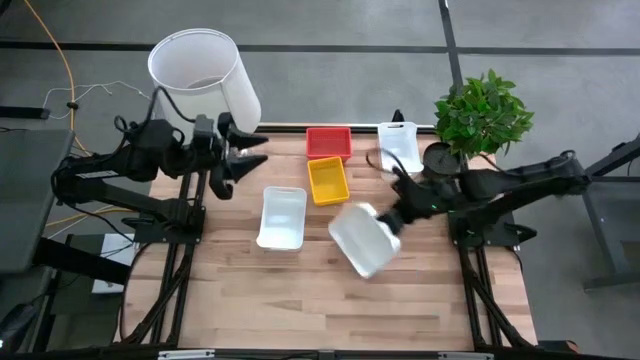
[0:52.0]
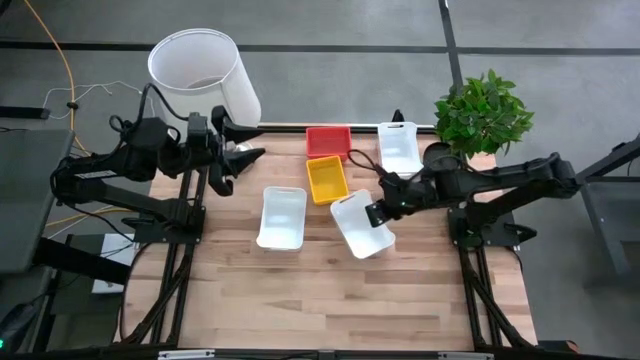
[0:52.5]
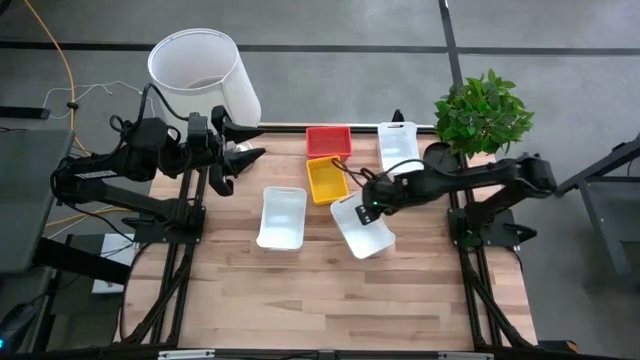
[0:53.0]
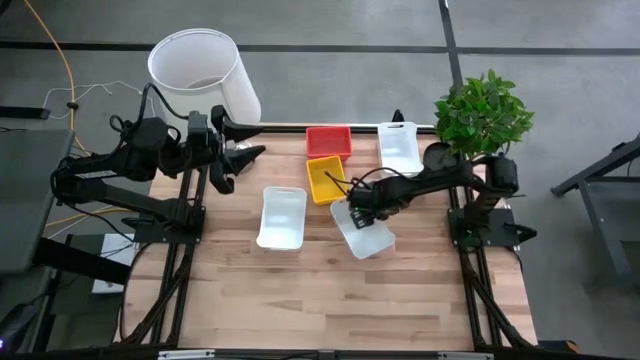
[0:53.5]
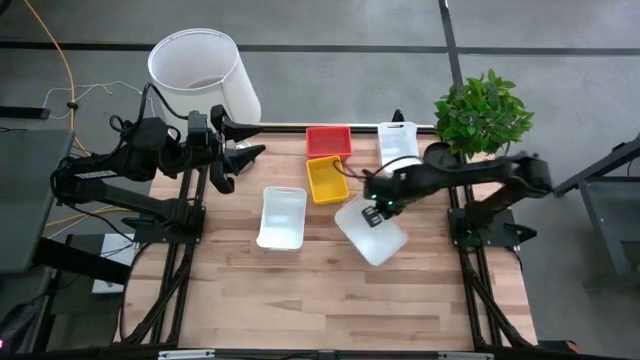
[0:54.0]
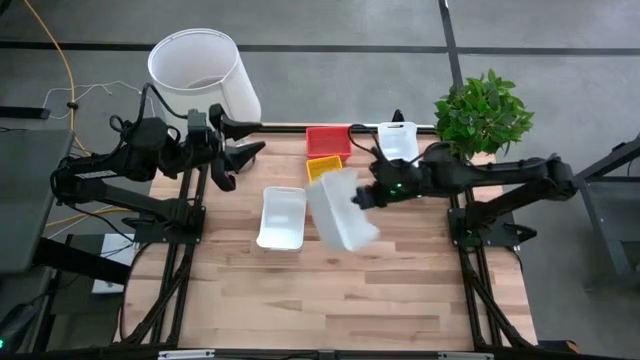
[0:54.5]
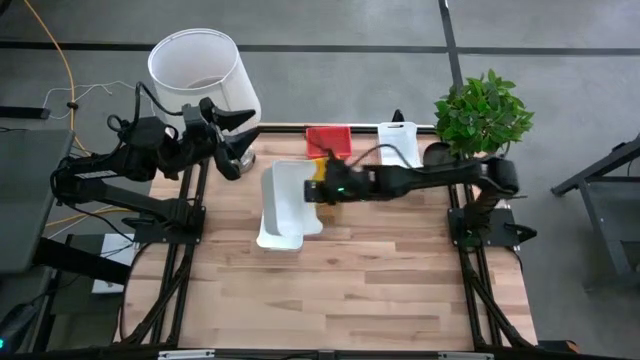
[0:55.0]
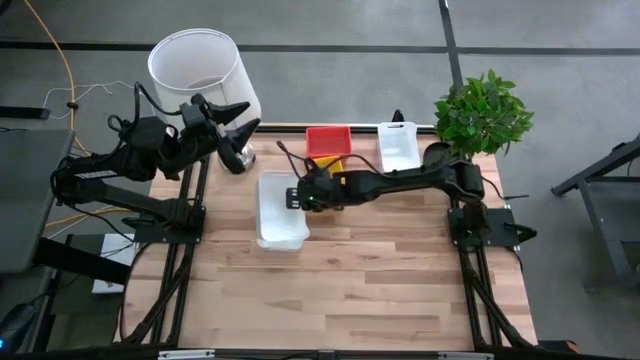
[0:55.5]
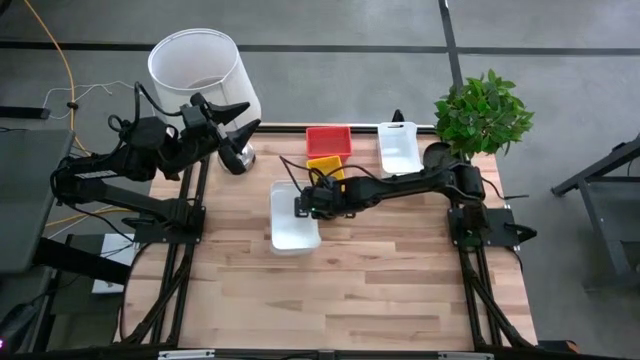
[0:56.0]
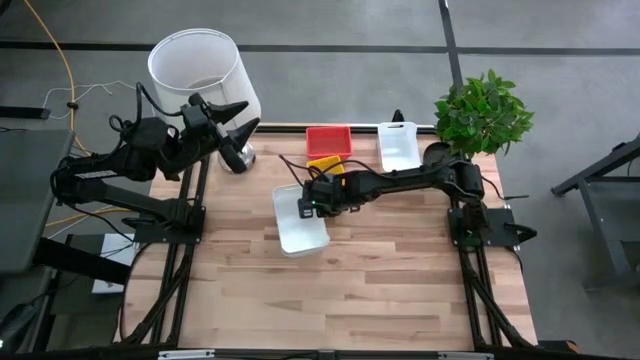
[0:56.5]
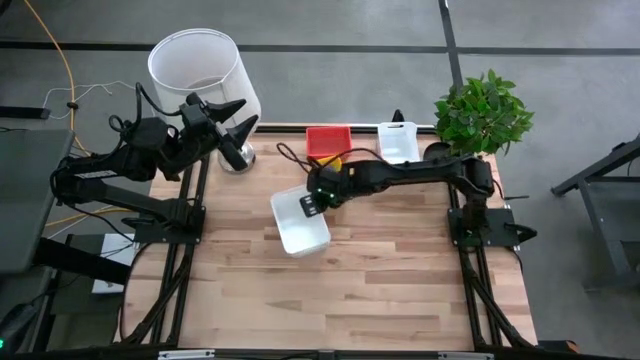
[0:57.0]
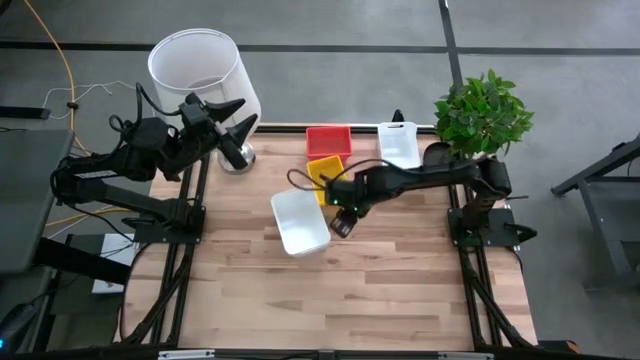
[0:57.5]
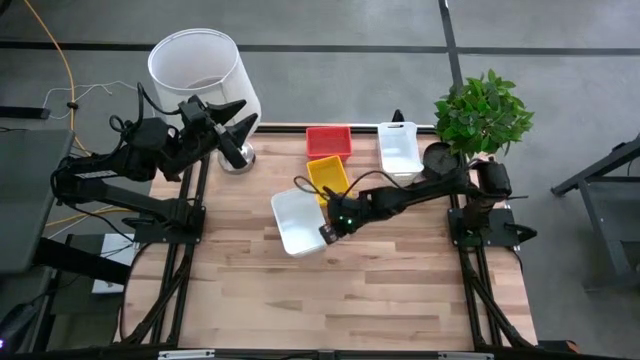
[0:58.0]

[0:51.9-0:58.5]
Stack the bottom right white bin on the middle white bin

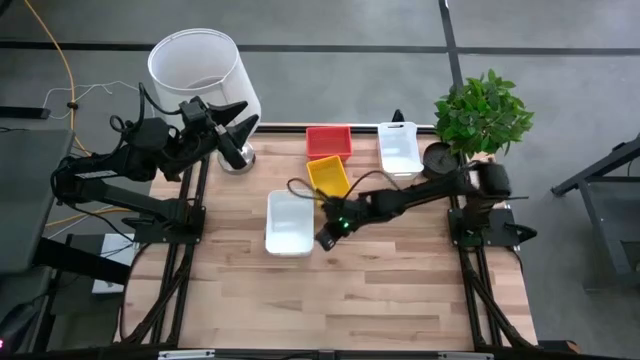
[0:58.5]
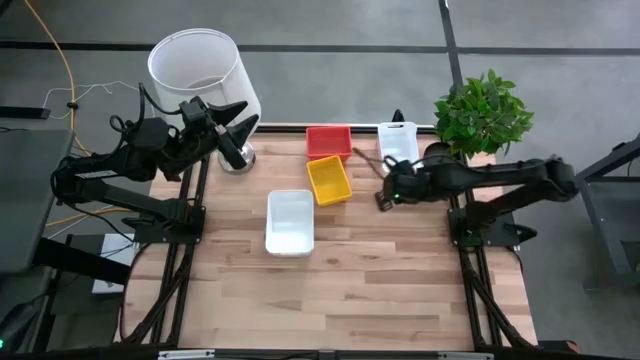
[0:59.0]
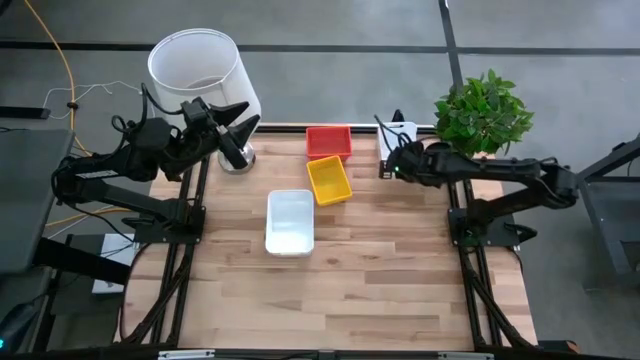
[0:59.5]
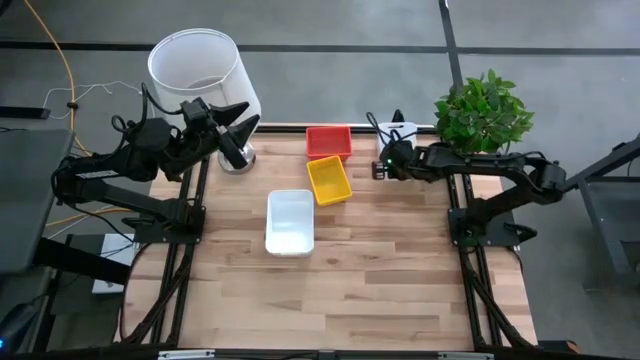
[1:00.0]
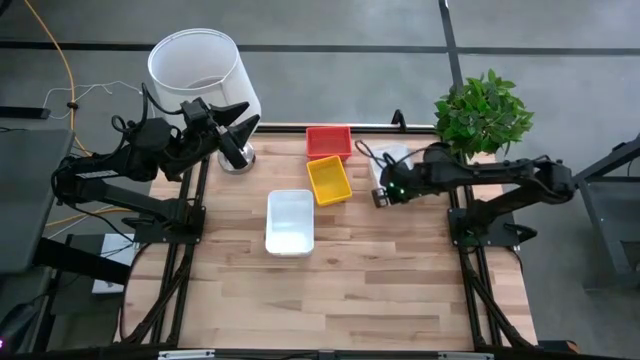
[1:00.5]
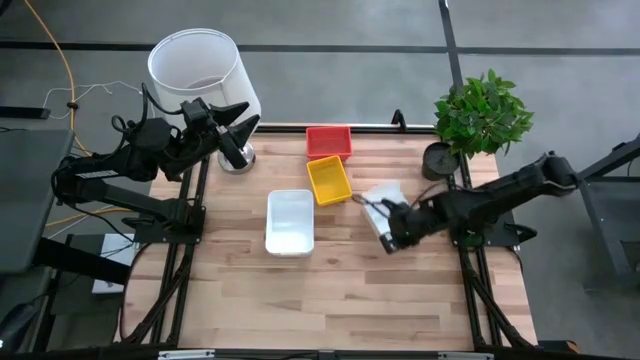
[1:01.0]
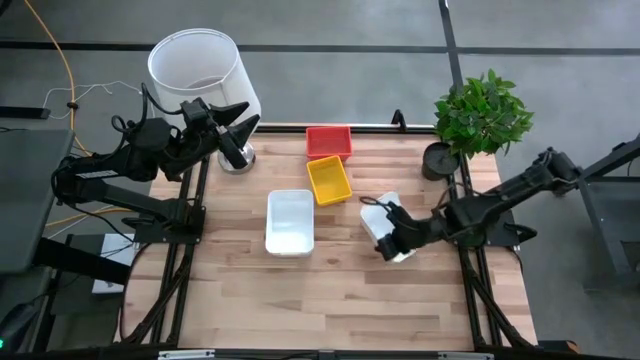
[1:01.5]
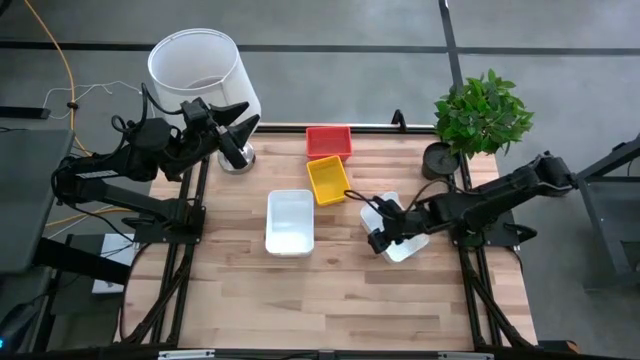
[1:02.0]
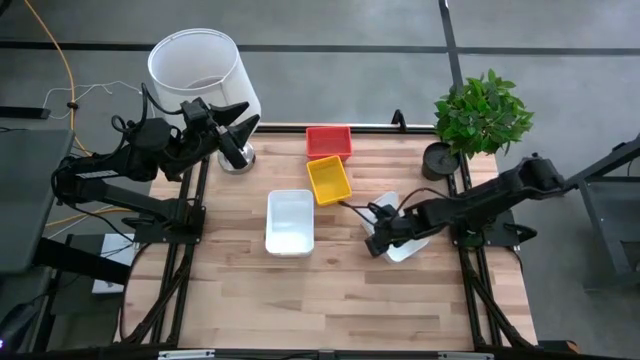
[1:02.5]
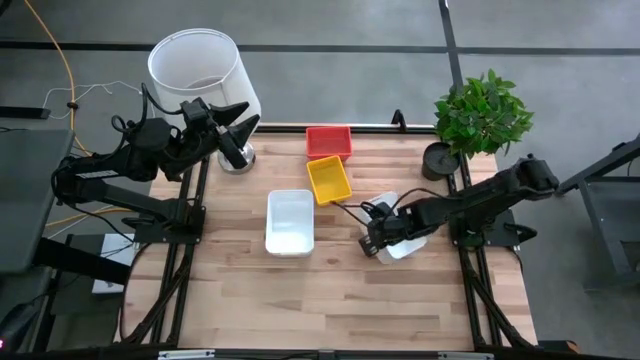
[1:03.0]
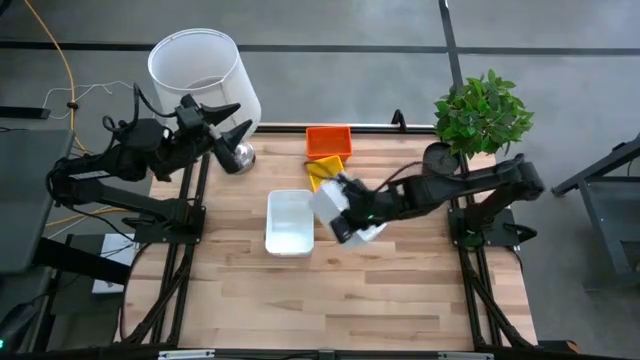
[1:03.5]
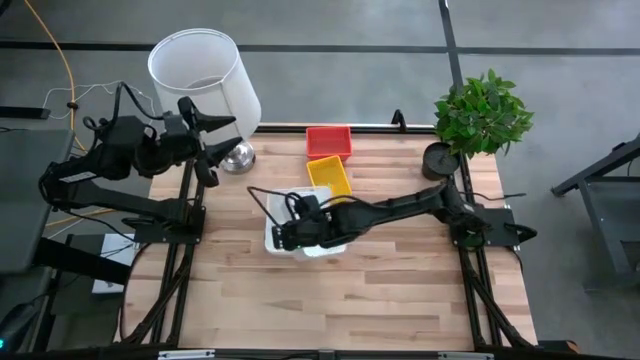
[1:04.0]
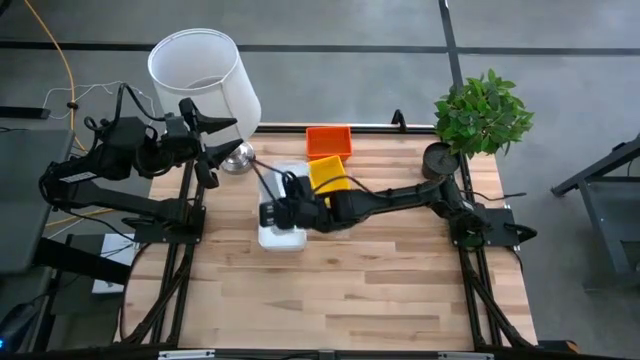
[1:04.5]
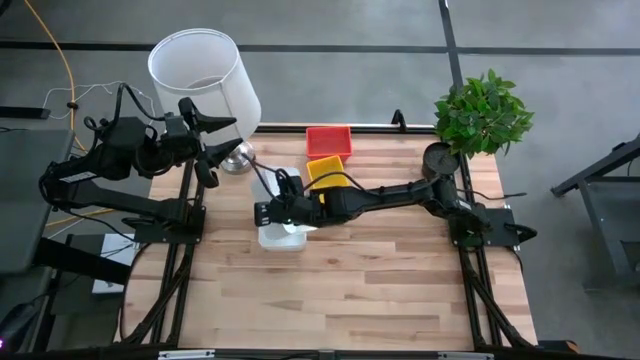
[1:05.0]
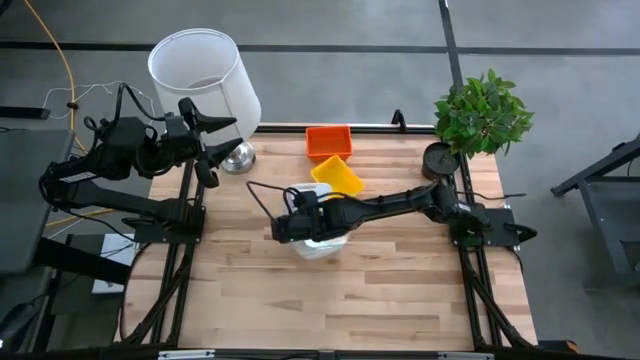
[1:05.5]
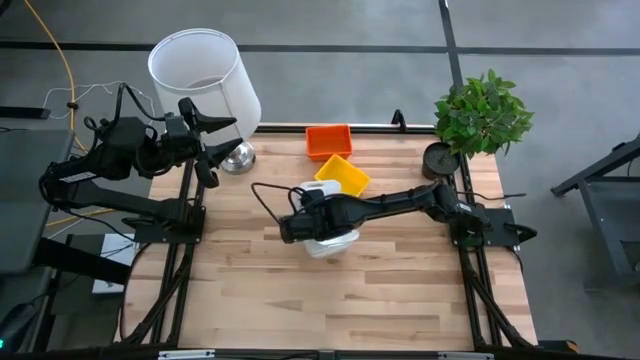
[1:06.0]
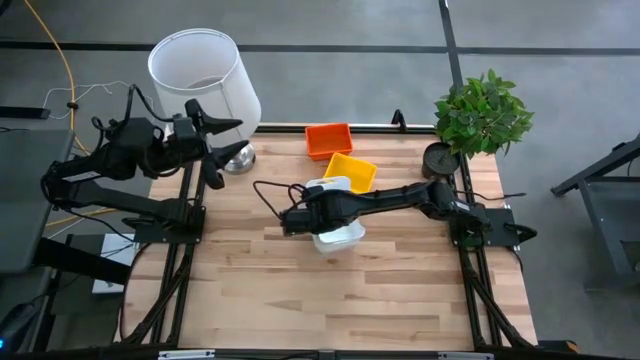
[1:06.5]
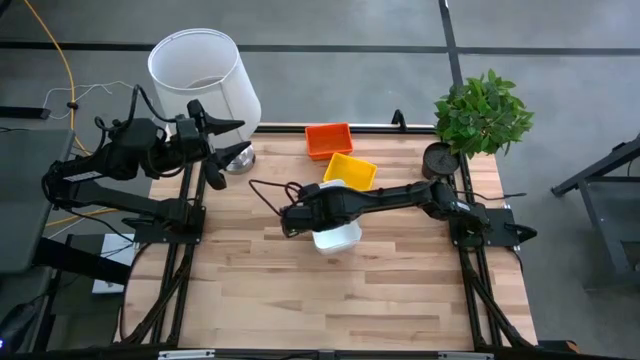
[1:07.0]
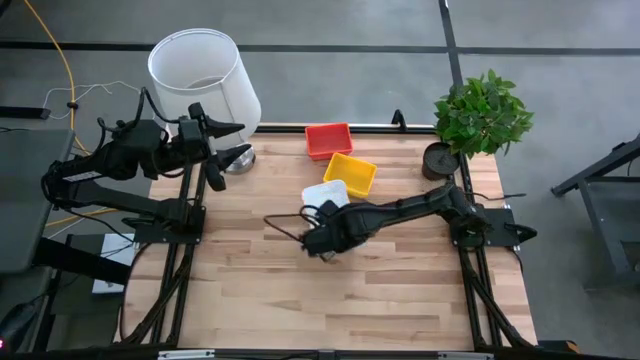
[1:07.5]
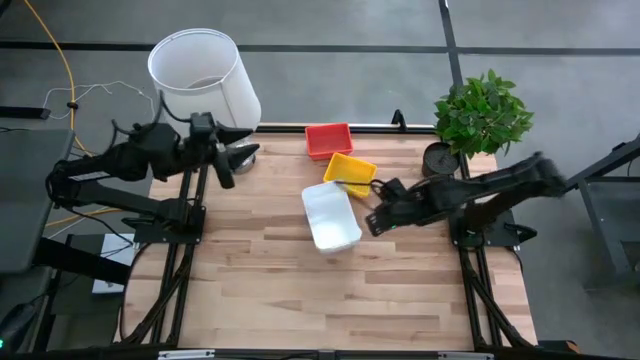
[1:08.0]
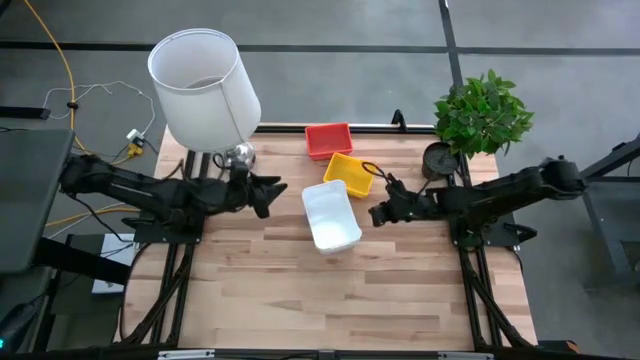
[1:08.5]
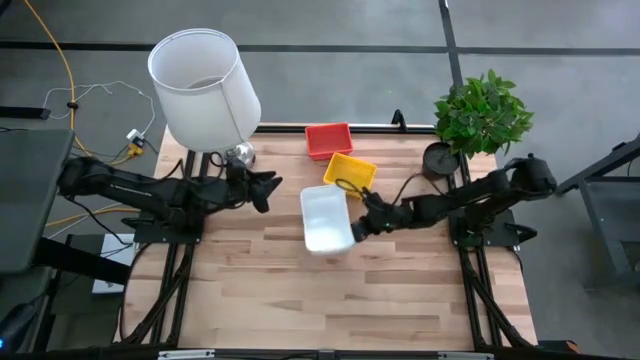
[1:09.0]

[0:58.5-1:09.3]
Stack the top white bin on the bottom white bin

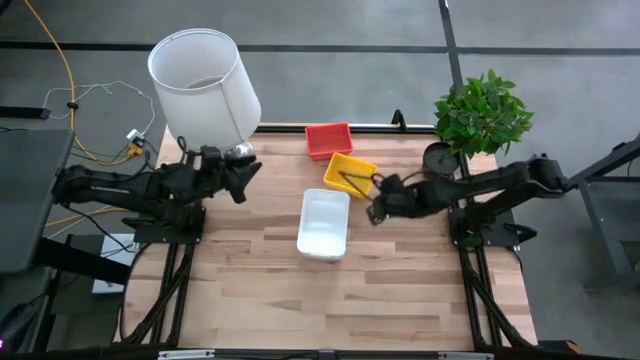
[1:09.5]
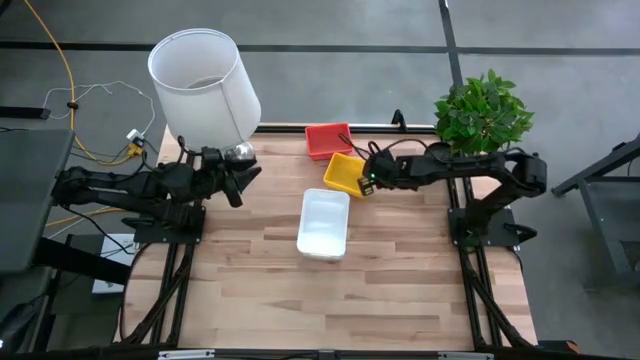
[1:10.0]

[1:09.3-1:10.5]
Adjust the stacked yellow bins

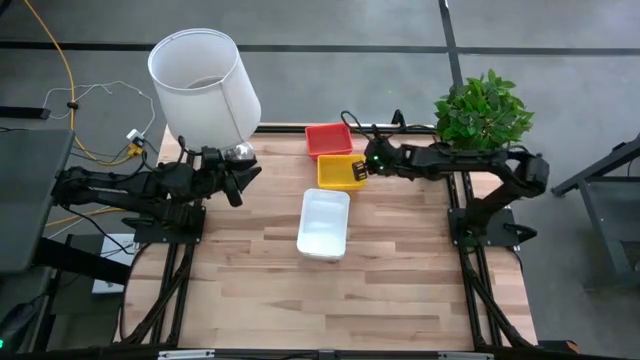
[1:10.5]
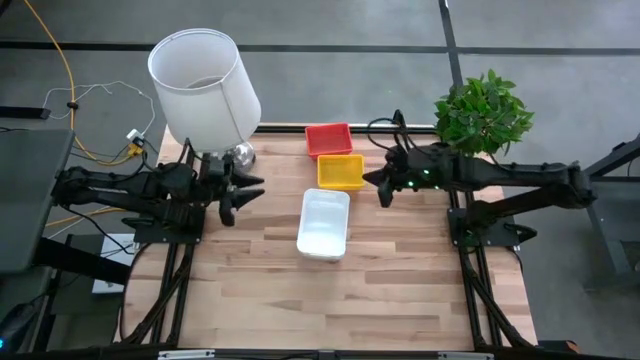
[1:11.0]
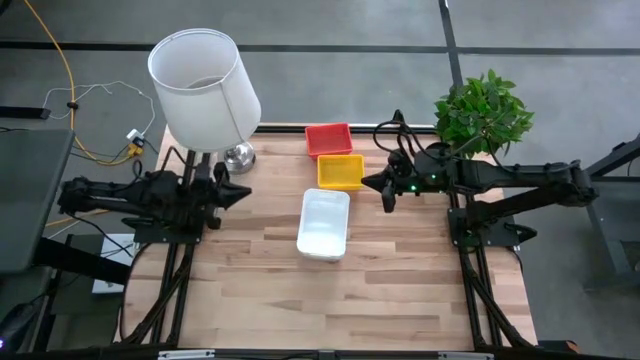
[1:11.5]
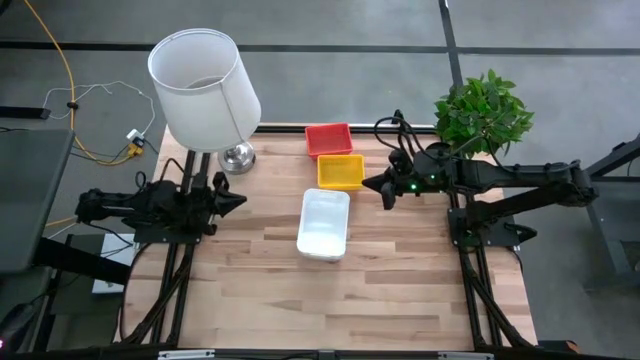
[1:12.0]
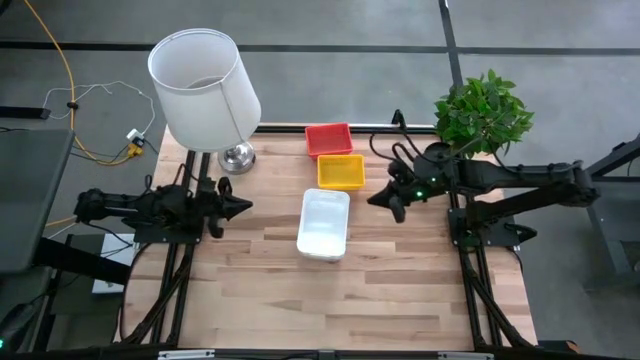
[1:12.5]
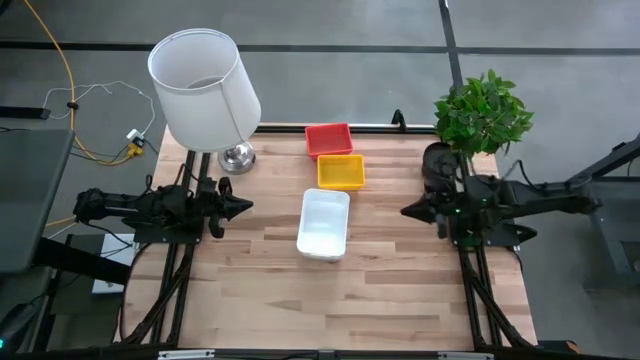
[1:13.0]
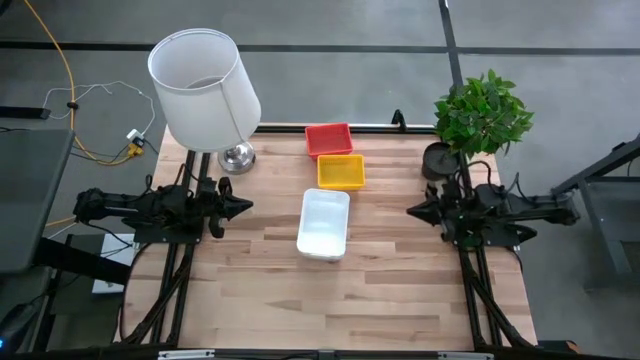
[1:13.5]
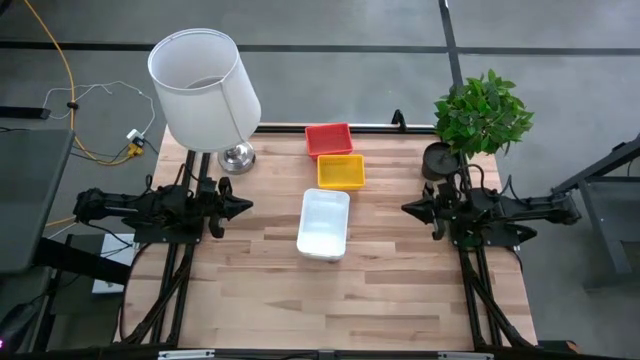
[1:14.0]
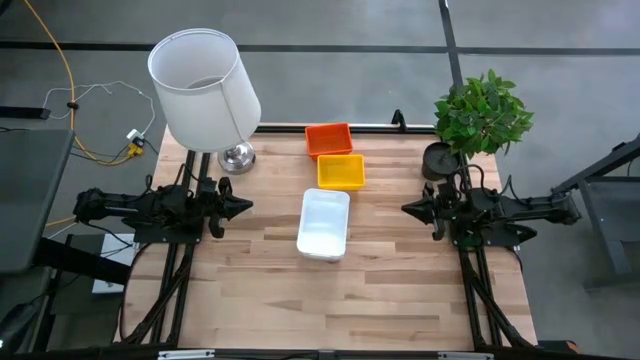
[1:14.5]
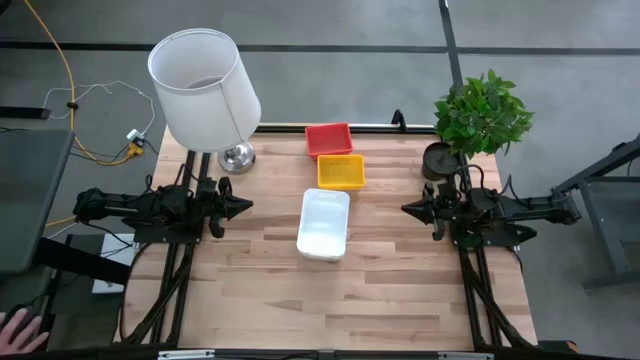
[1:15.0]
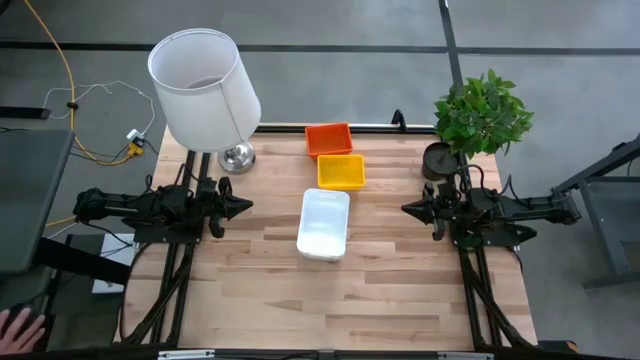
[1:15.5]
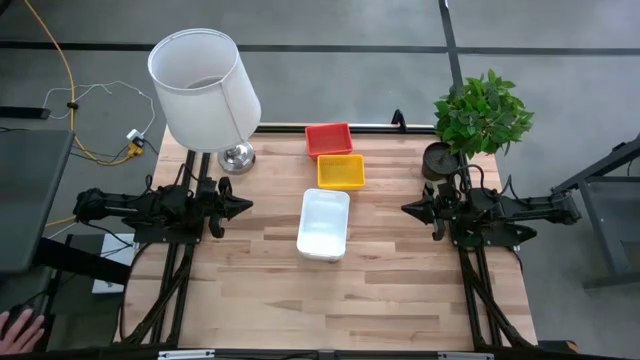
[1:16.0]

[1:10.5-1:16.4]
Return to Home Position
